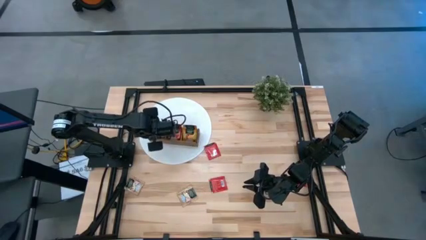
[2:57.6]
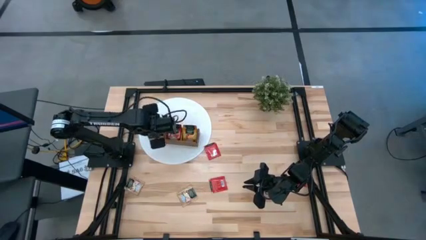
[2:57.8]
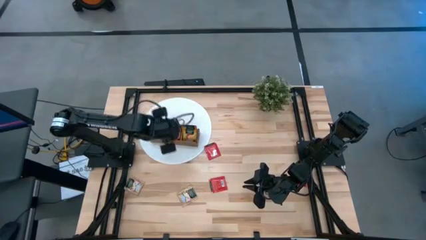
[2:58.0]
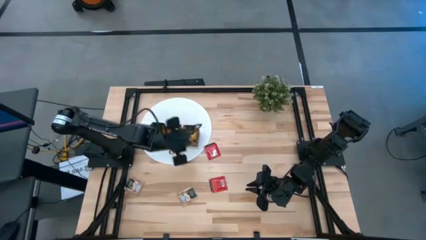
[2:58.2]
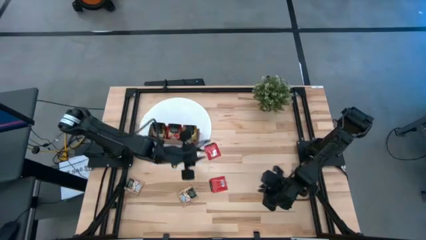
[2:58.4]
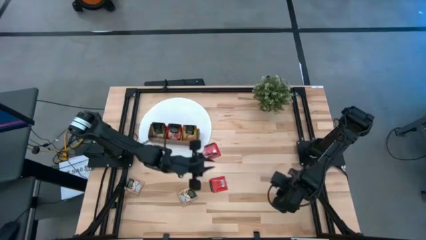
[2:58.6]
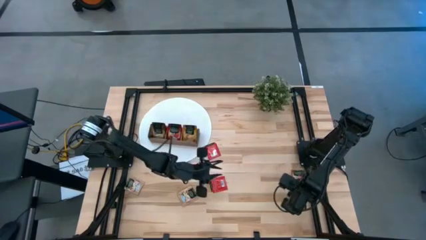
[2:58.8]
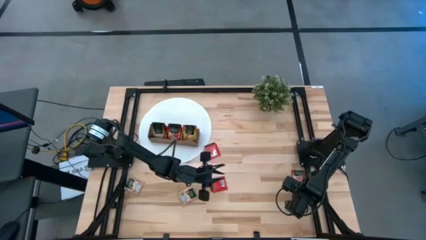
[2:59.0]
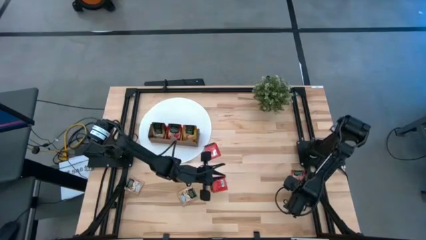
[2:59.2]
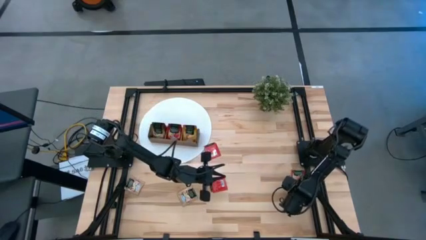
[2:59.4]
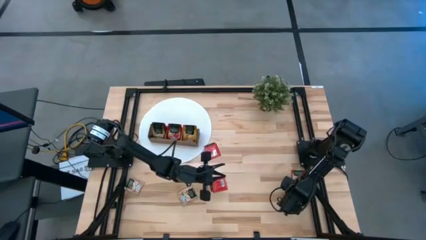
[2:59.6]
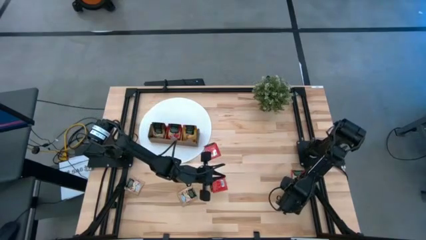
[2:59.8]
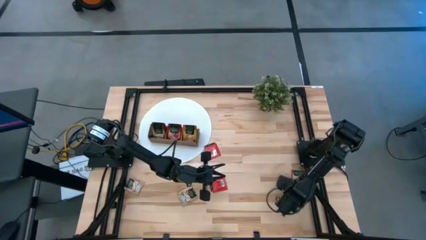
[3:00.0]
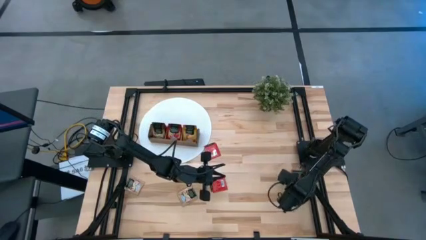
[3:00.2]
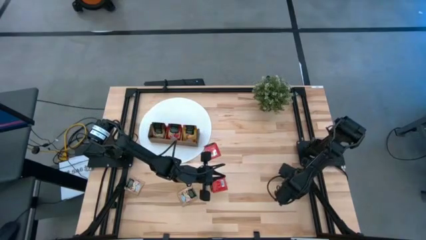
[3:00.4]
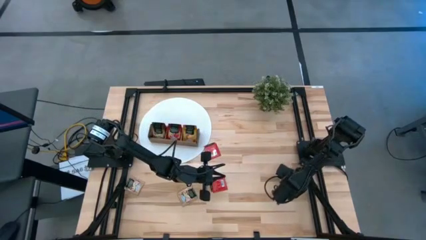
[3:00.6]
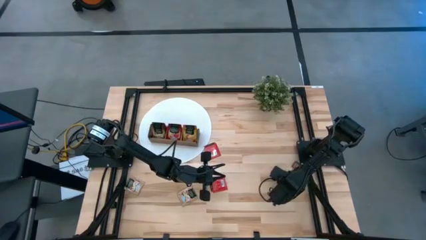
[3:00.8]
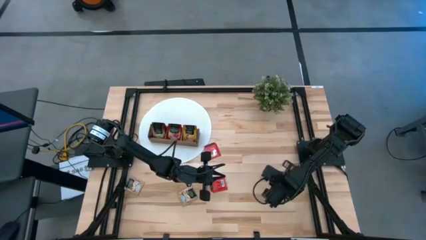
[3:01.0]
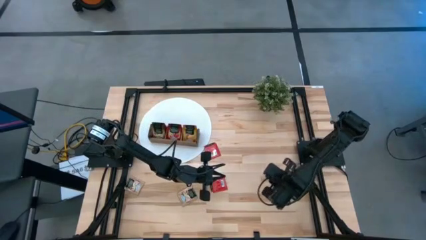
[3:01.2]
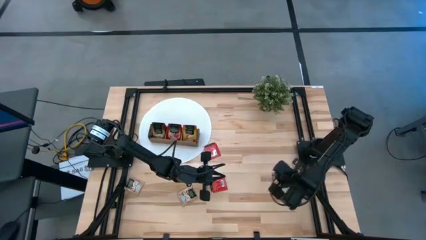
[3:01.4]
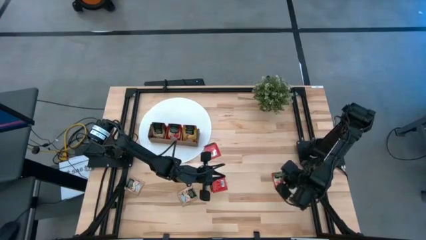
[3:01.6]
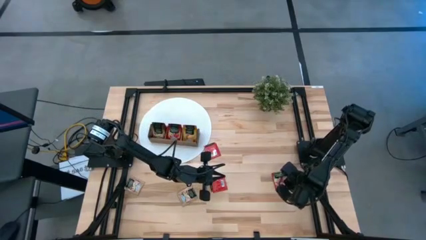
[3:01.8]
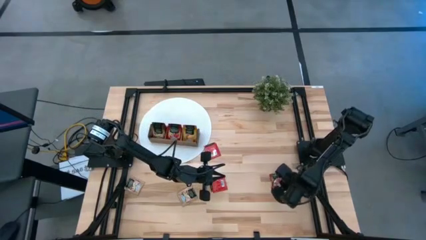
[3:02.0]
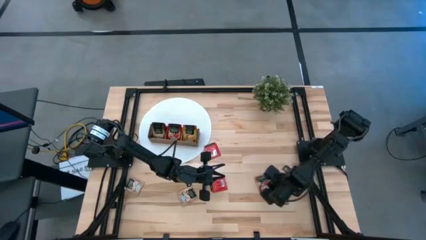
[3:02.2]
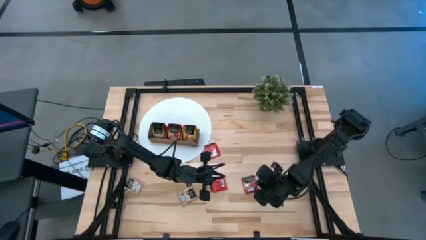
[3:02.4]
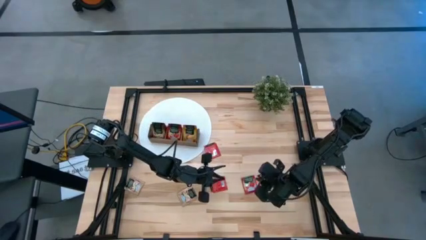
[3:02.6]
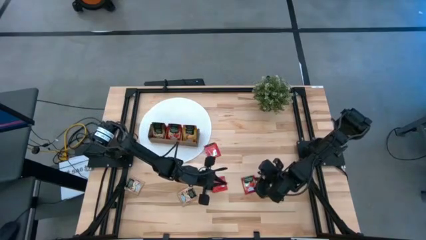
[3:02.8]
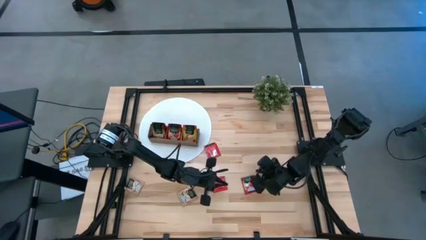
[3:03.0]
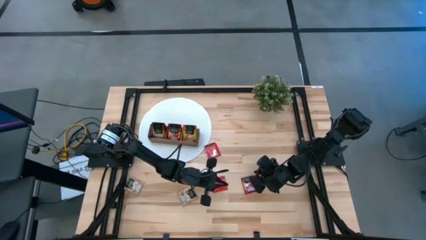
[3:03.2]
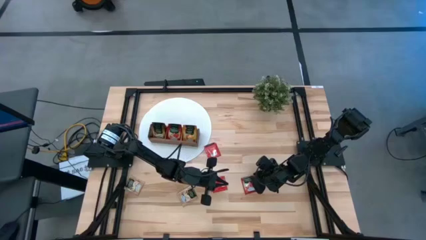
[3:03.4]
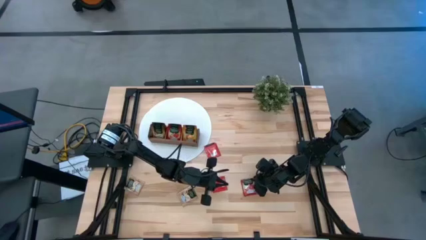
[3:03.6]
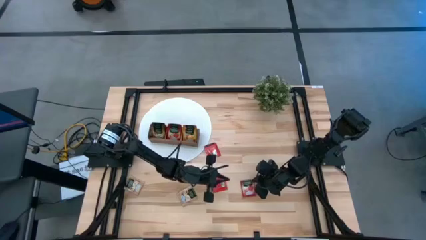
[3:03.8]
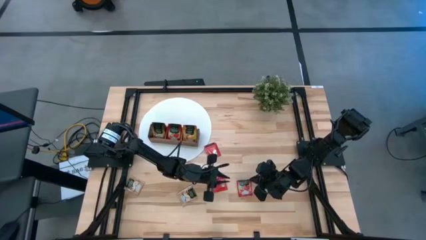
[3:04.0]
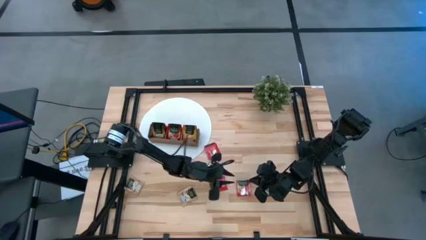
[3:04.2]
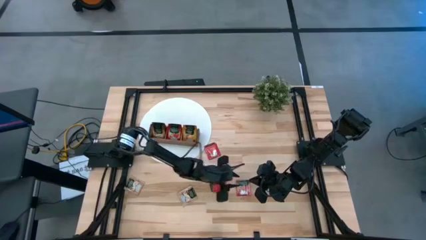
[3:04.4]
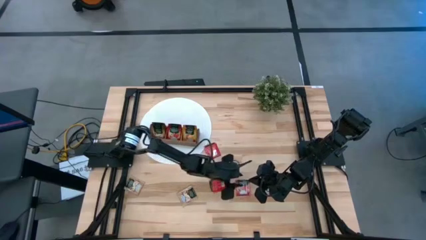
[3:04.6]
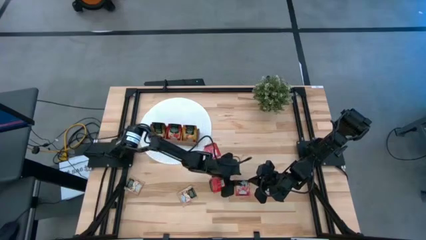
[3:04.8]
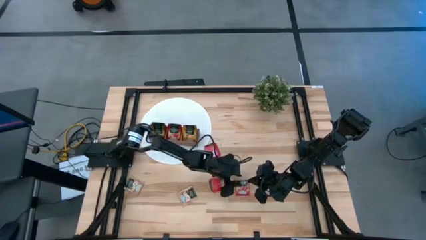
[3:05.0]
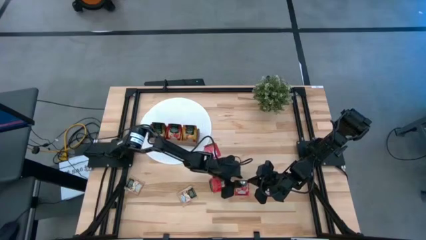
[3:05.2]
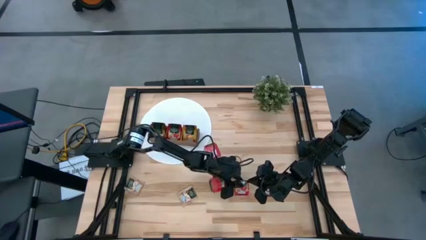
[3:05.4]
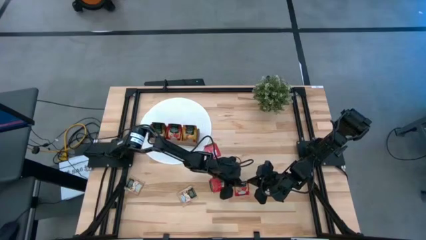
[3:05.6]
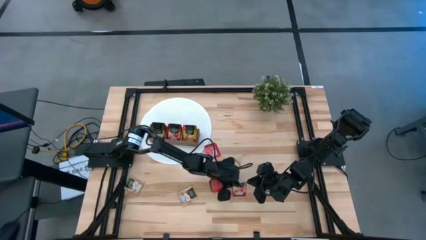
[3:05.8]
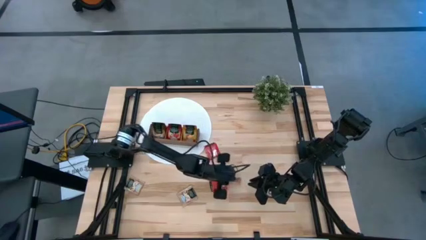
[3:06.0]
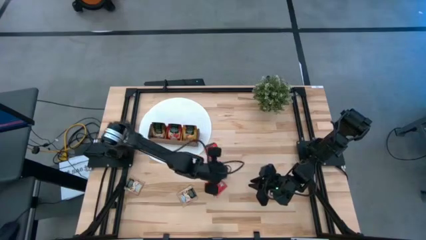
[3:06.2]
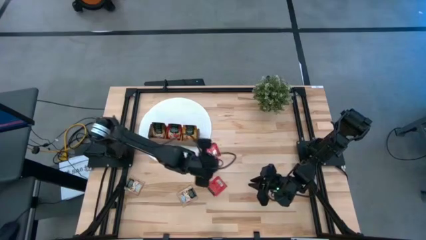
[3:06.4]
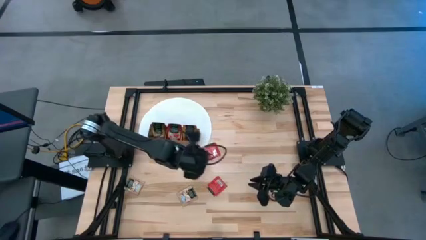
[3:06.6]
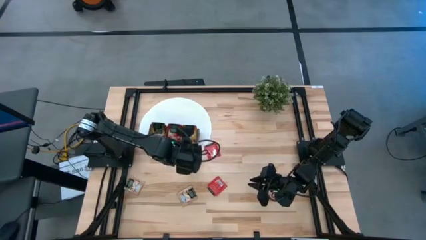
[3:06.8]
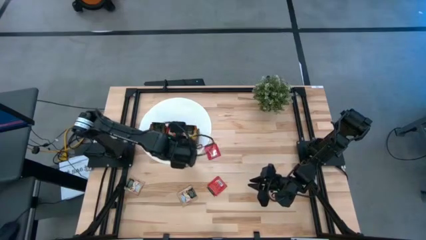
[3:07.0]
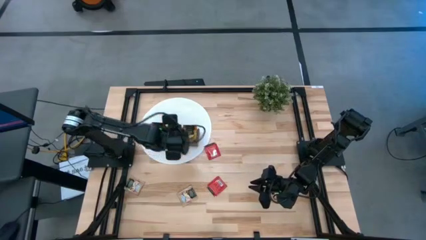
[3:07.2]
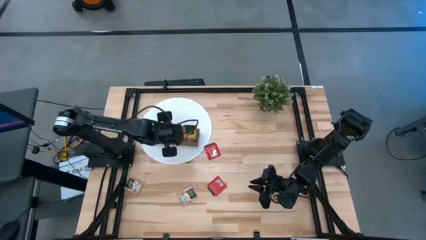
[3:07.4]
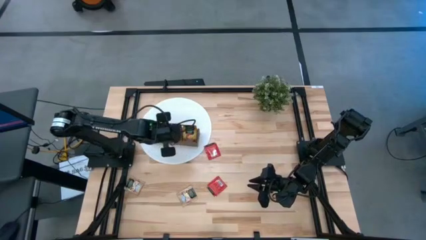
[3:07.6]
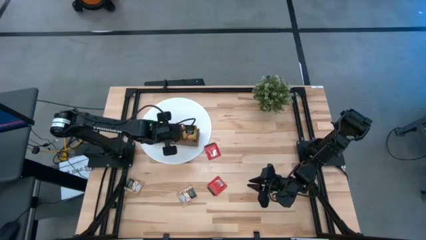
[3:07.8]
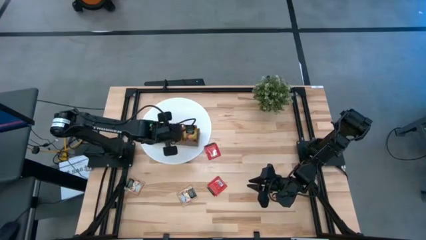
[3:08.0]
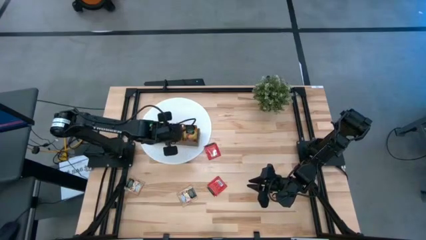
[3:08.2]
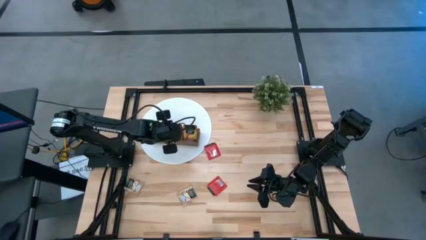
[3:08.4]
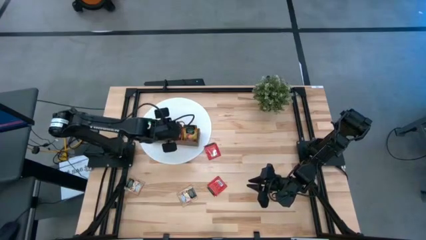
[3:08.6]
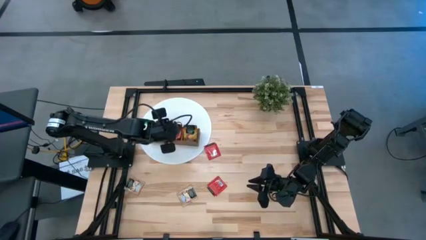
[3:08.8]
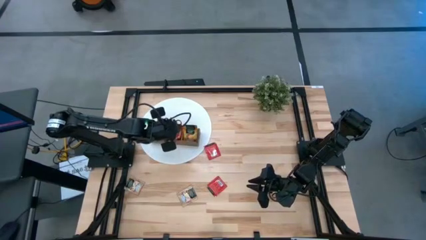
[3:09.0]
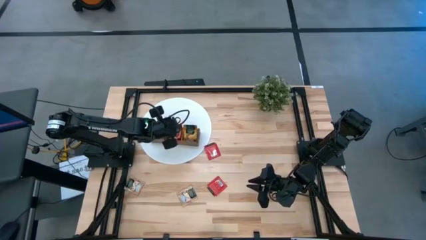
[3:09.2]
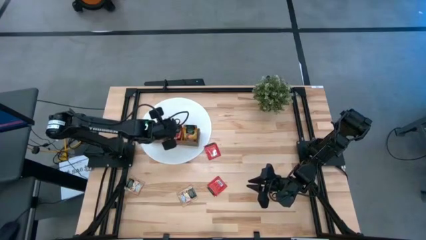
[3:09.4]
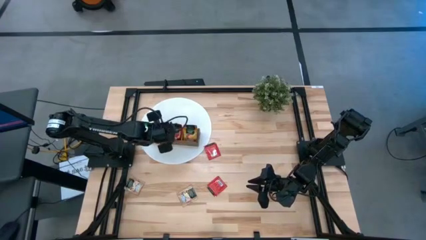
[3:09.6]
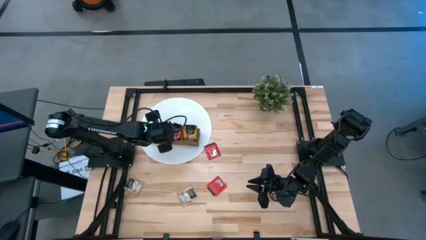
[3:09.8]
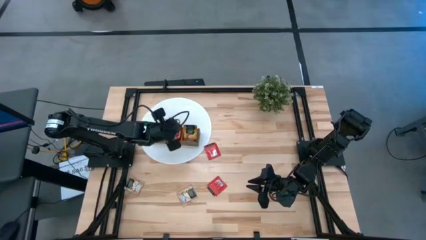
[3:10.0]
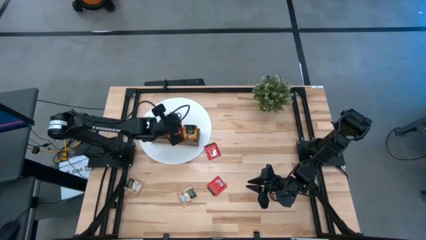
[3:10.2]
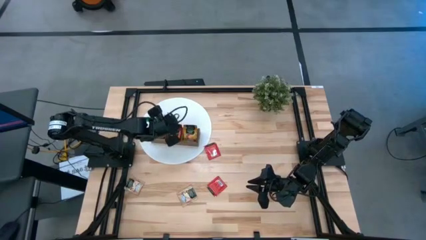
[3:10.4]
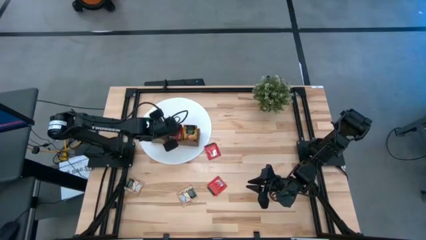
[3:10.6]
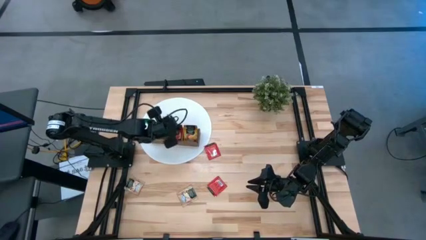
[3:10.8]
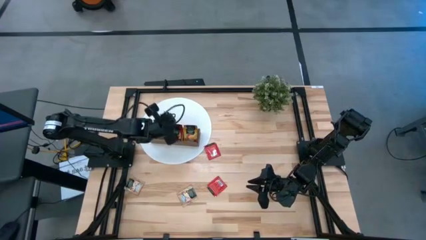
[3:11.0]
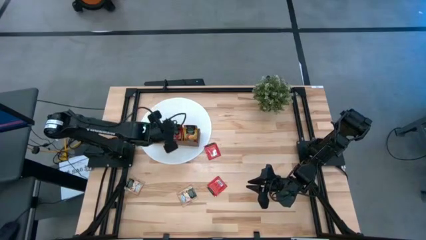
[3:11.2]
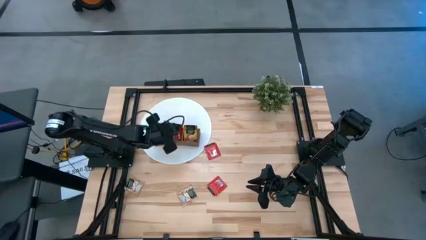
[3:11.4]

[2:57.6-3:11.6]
Task: Pick & Place Tea
Put the red tea bag into the middle section of the wooden organizer

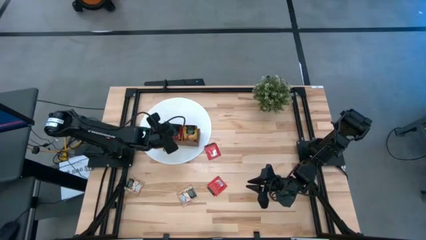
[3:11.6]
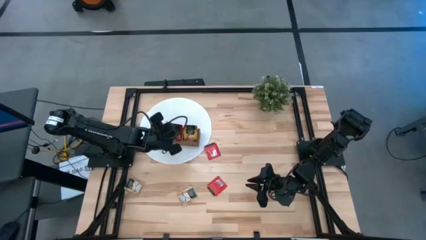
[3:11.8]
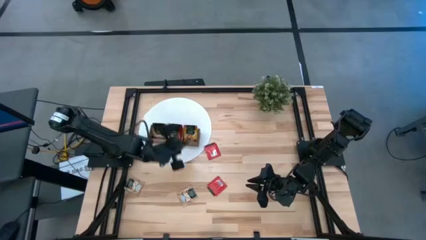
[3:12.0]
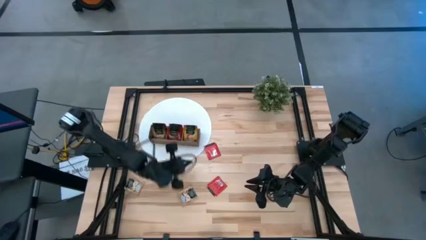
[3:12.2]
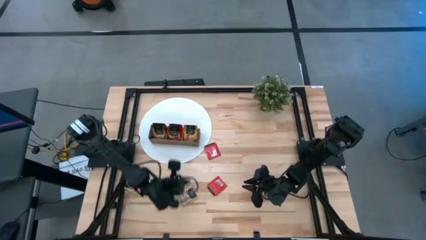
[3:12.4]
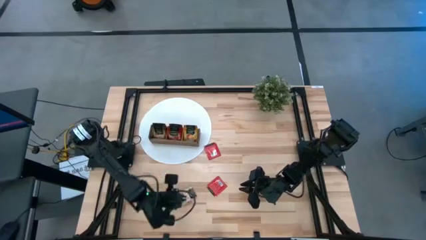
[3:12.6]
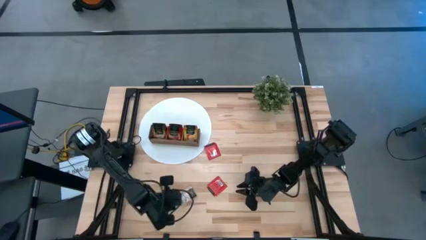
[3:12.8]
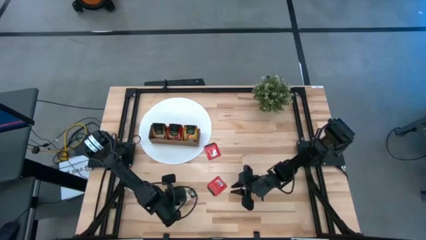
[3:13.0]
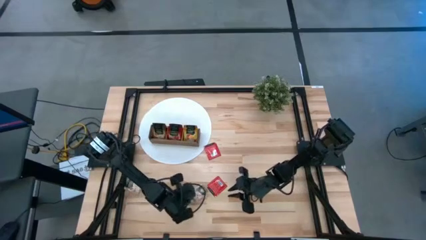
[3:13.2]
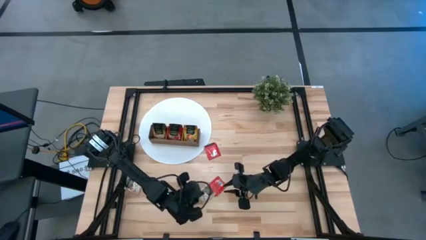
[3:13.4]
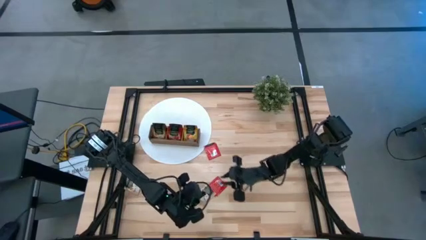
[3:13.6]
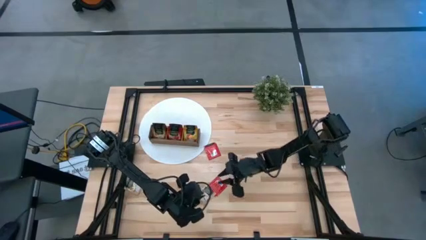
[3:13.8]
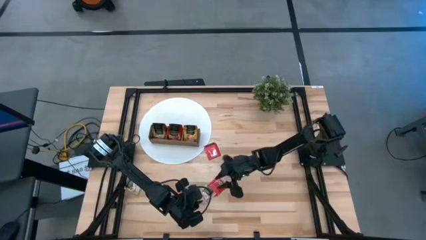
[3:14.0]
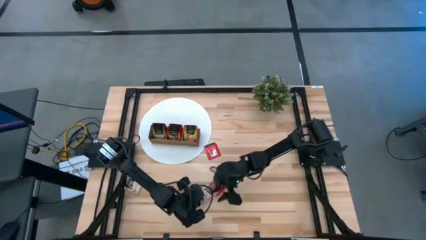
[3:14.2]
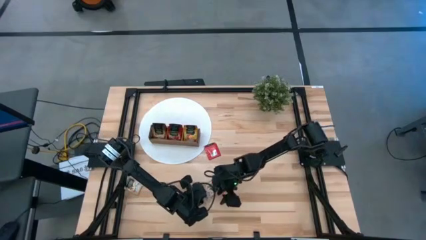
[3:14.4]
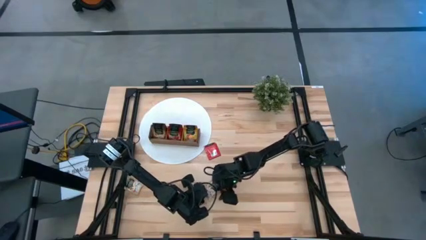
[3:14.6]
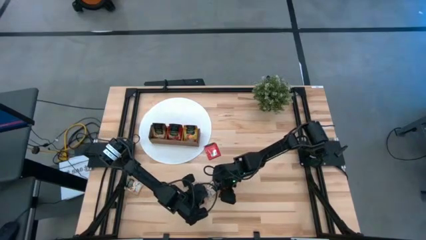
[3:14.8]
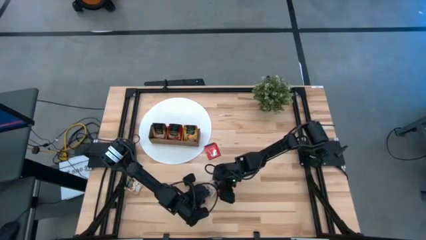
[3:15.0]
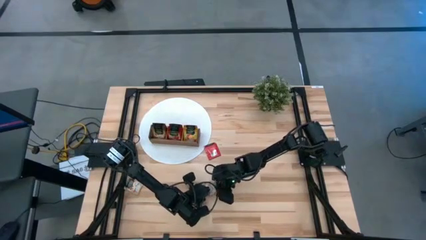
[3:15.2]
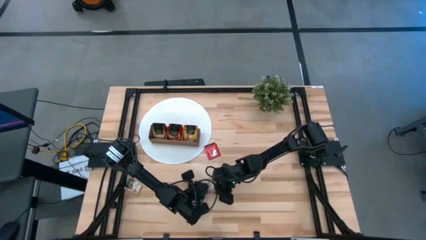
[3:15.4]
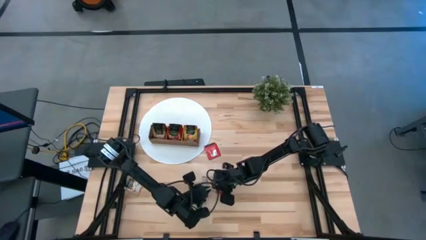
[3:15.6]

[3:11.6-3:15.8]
Put the brown tea bag into the left section of the wooden organizer
